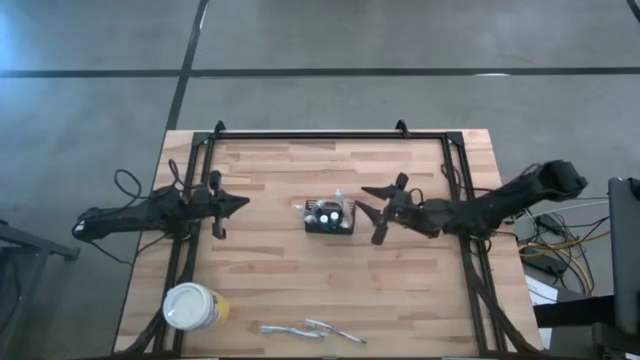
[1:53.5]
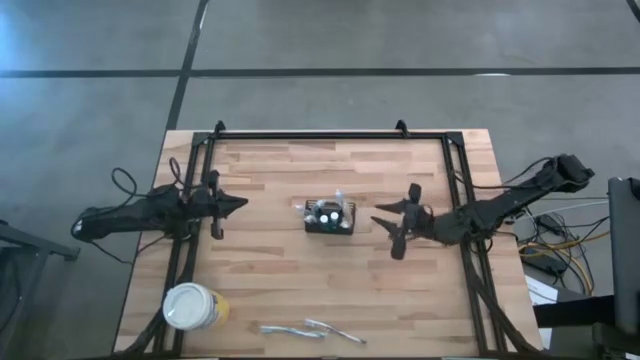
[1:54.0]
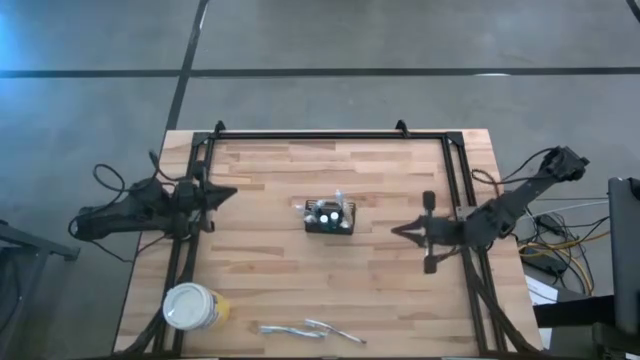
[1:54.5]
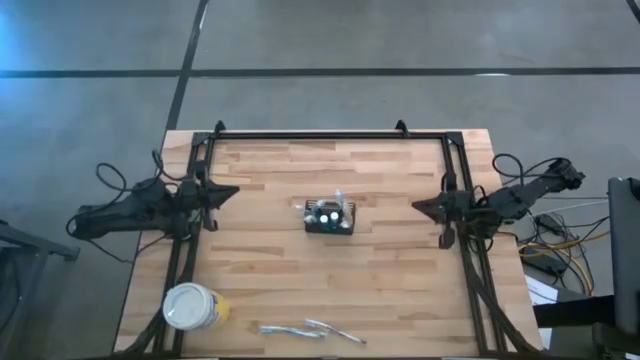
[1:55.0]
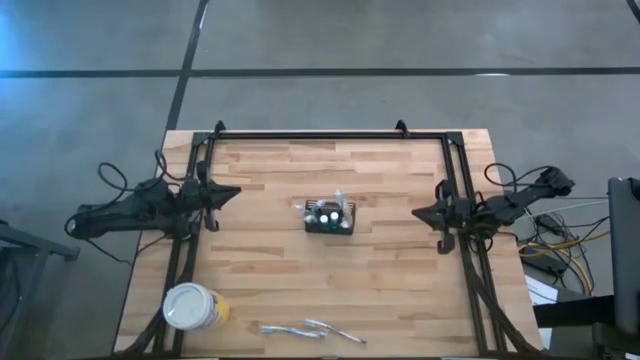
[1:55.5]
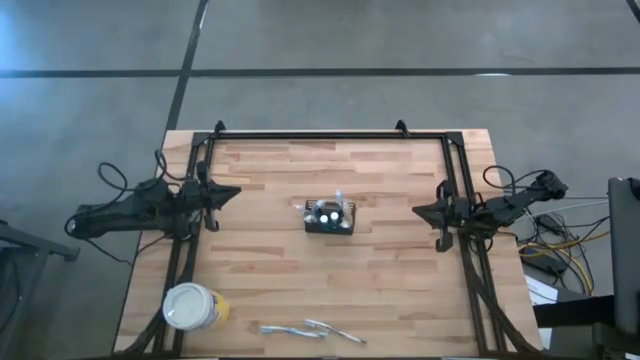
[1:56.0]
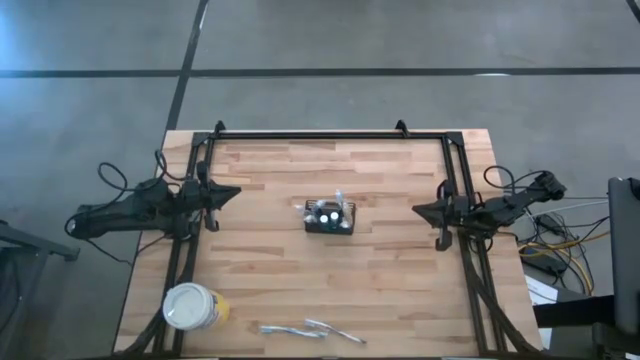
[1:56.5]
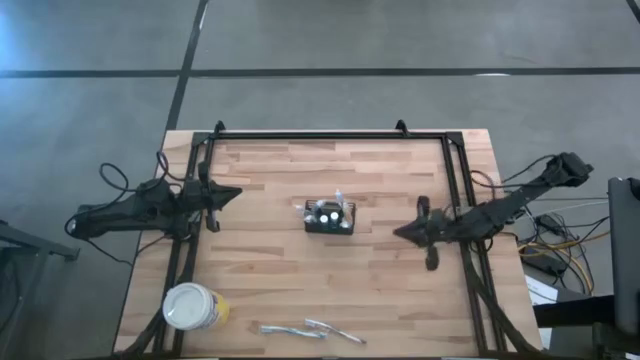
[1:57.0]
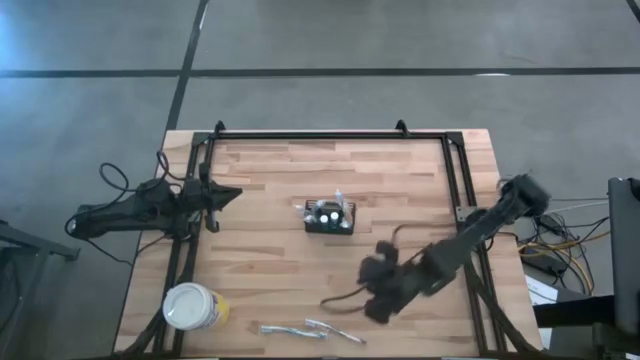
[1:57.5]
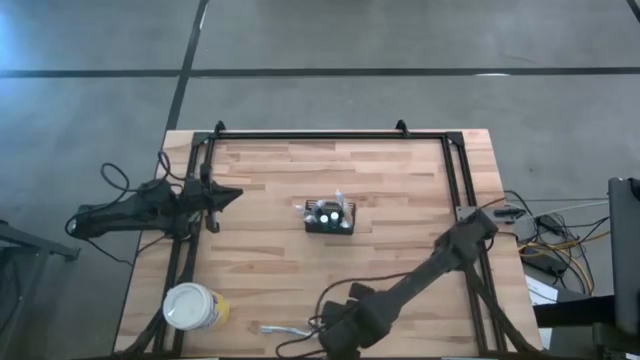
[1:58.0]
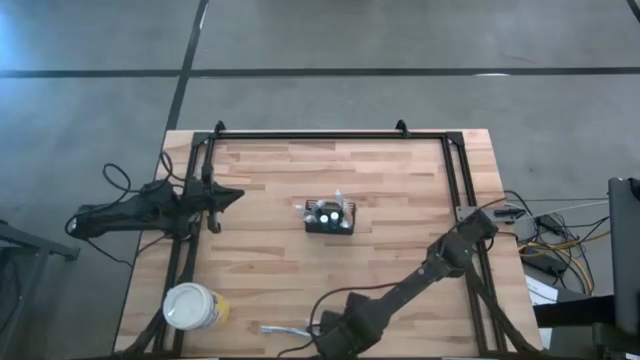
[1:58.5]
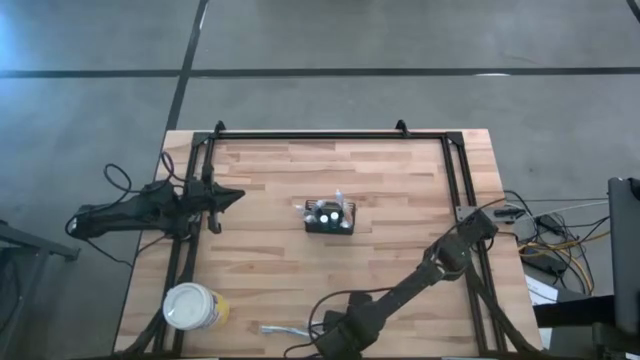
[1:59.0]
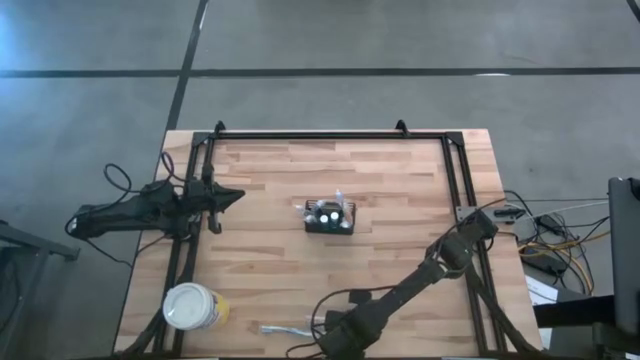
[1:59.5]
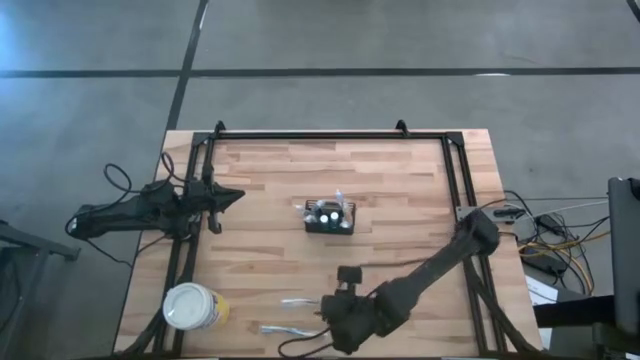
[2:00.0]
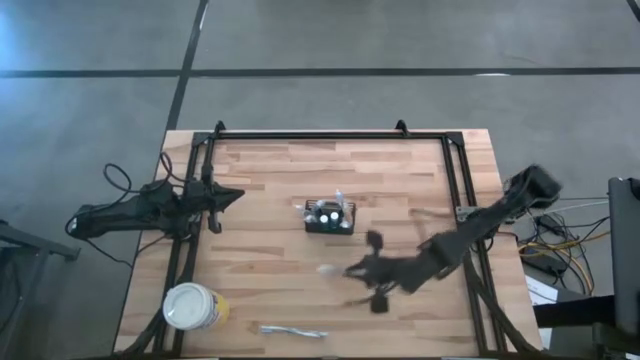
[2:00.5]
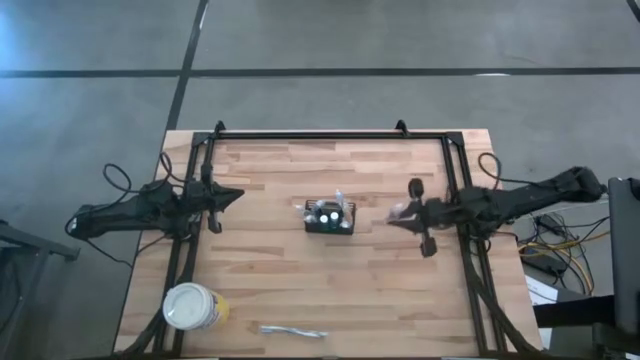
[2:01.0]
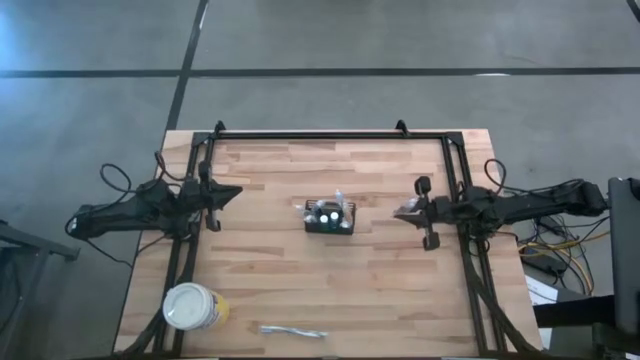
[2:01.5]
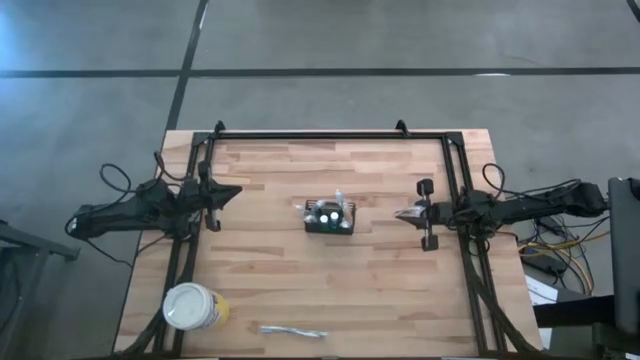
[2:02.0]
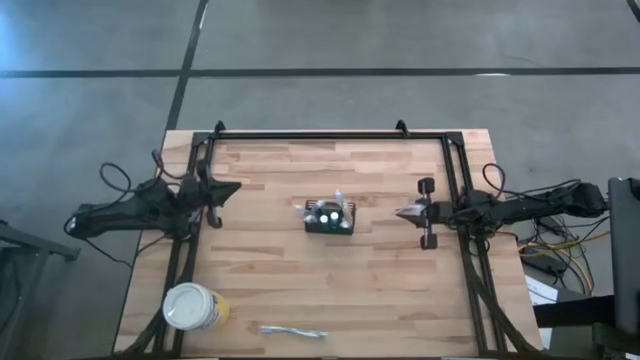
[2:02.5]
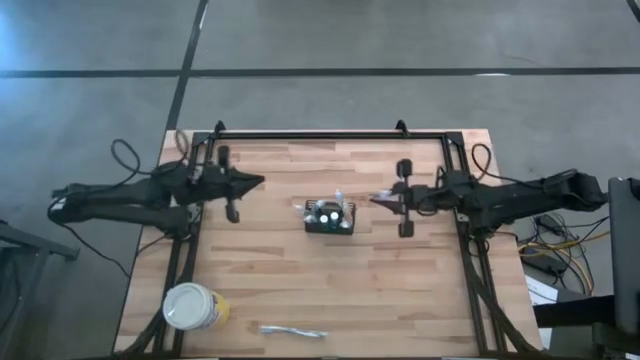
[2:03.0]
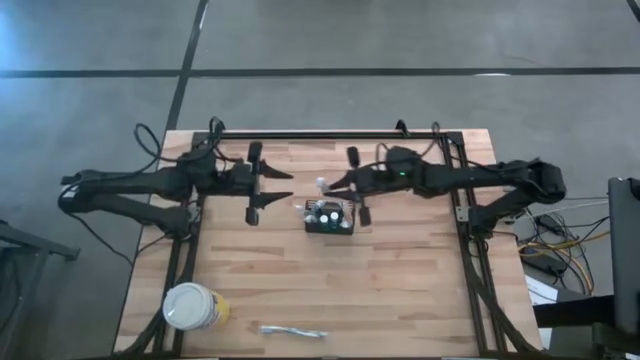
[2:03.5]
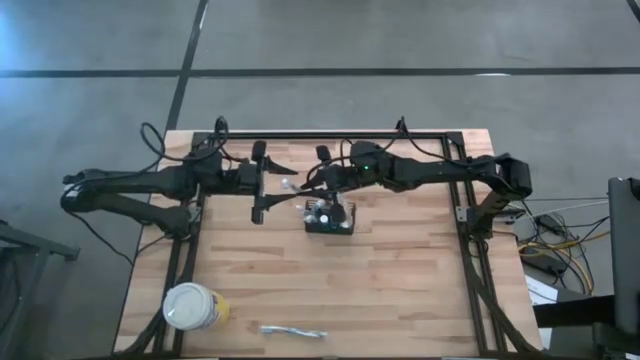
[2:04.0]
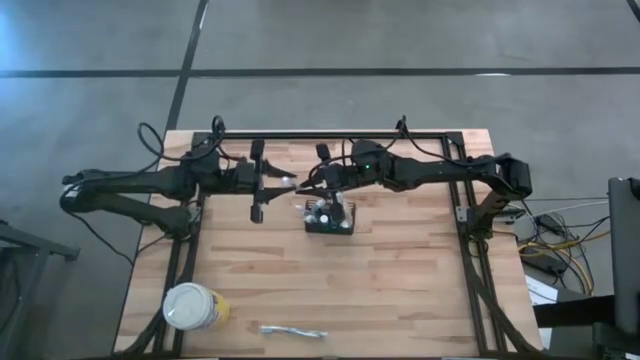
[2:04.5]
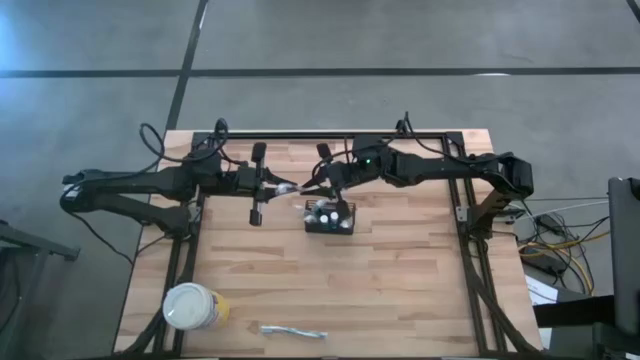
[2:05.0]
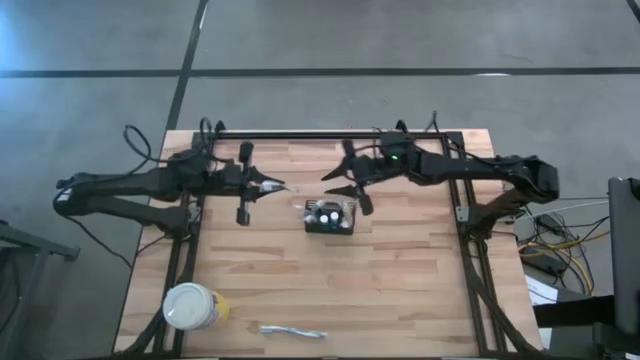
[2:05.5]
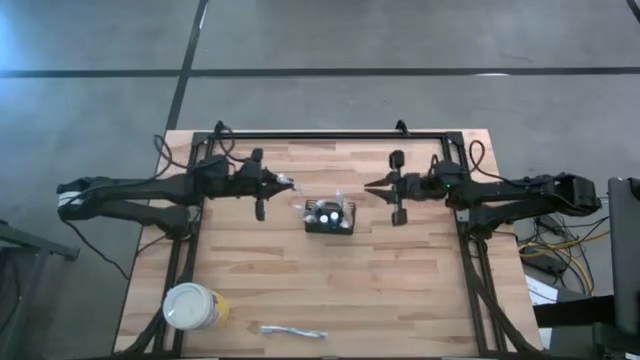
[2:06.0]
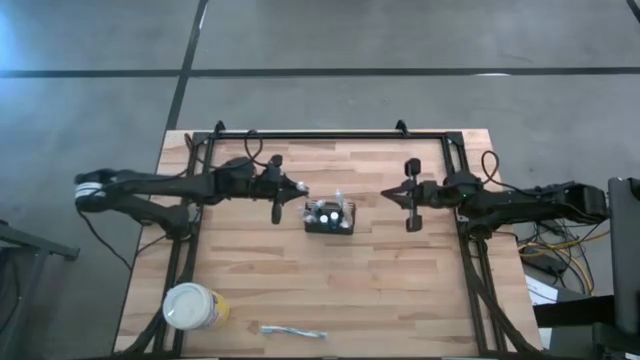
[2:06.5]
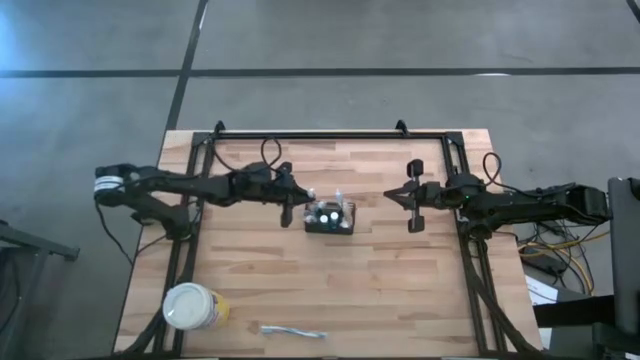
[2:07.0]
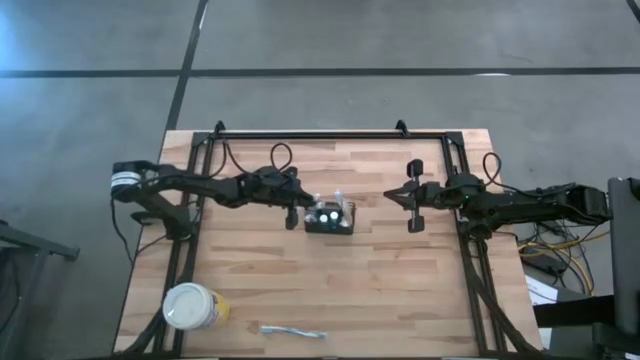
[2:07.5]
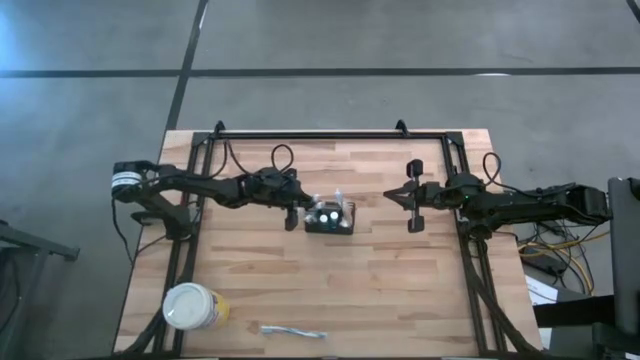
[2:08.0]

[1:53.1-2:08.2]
Task: Pick & Place toothbrushing station
Put the purple toothbrush into the wire organizer

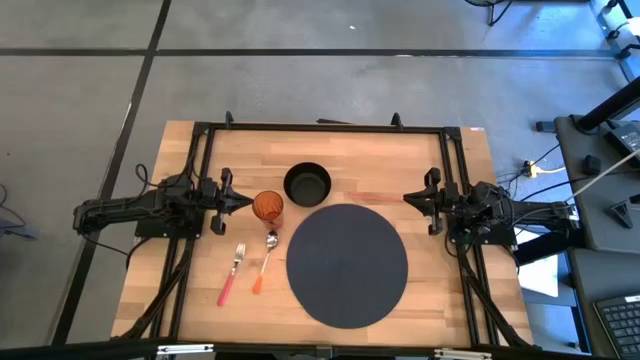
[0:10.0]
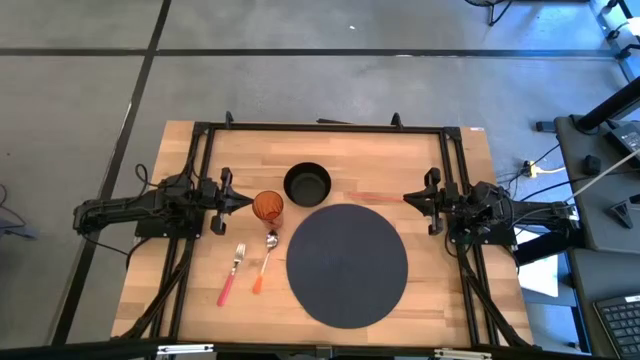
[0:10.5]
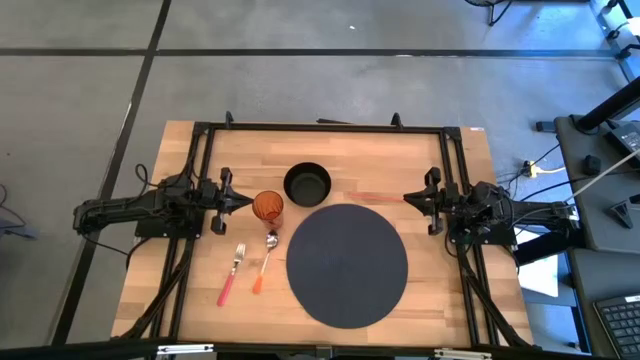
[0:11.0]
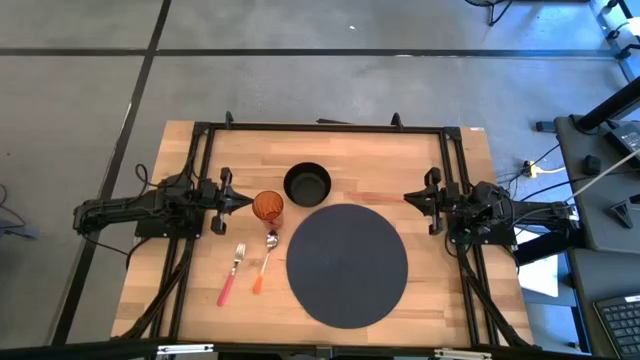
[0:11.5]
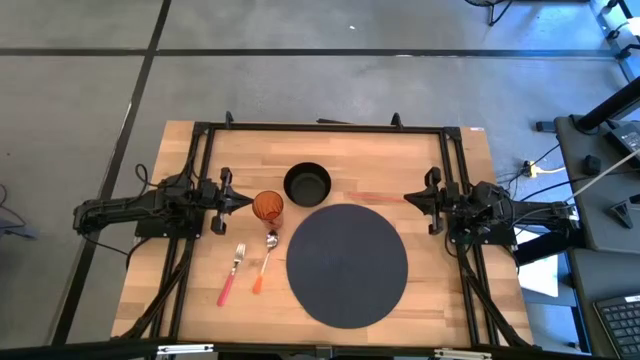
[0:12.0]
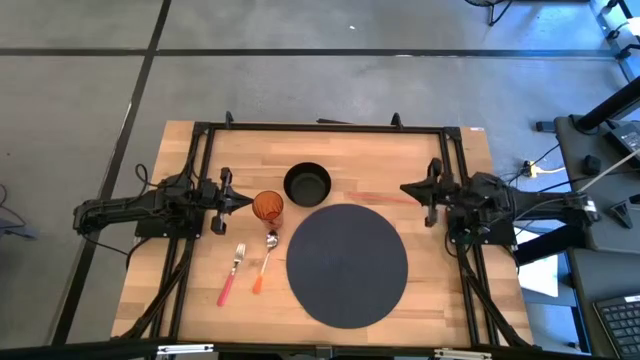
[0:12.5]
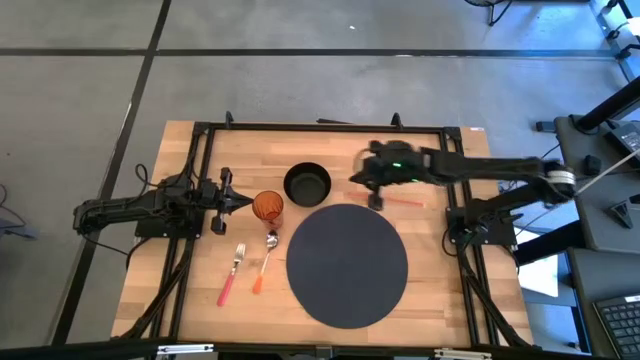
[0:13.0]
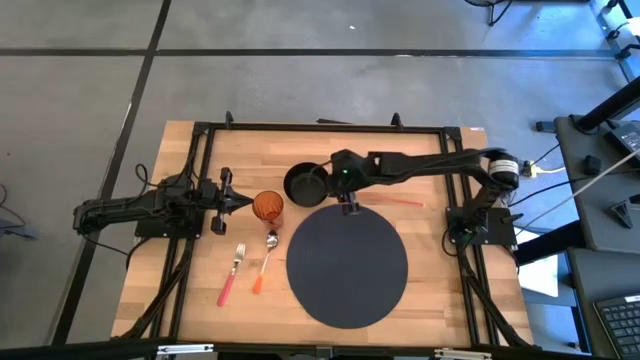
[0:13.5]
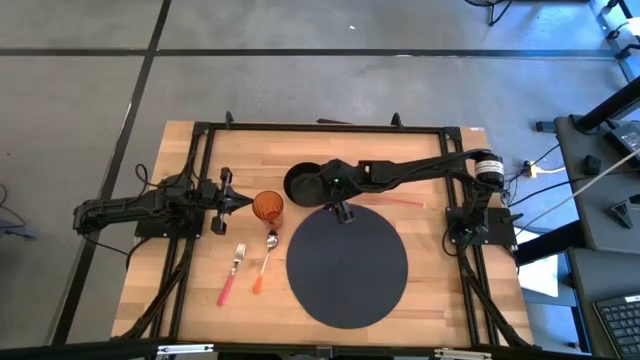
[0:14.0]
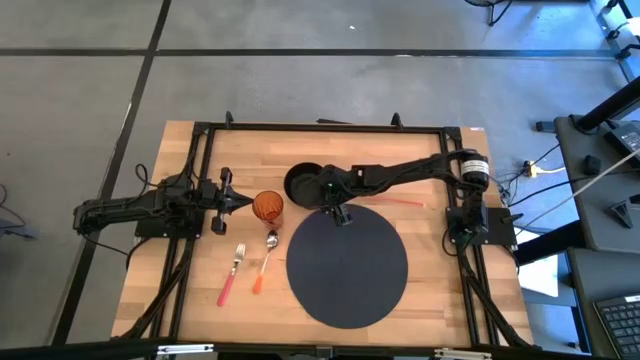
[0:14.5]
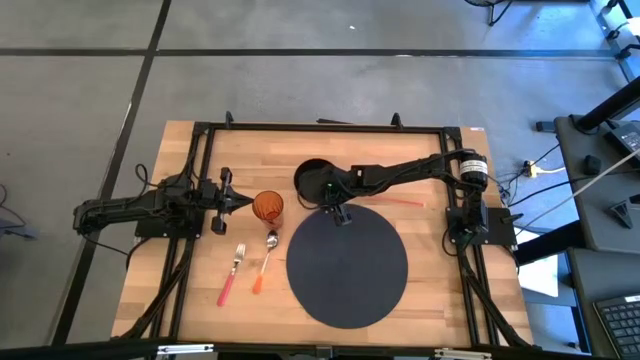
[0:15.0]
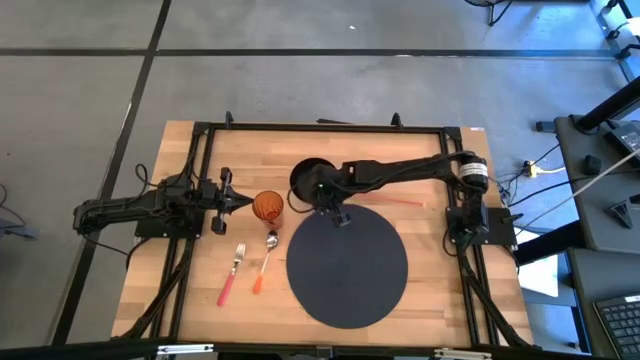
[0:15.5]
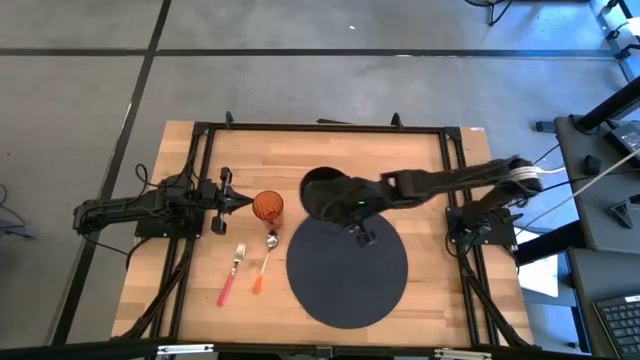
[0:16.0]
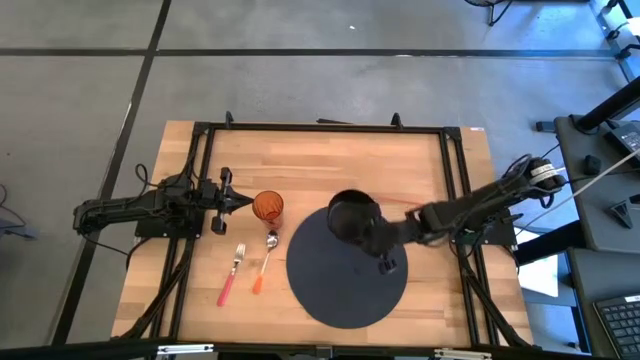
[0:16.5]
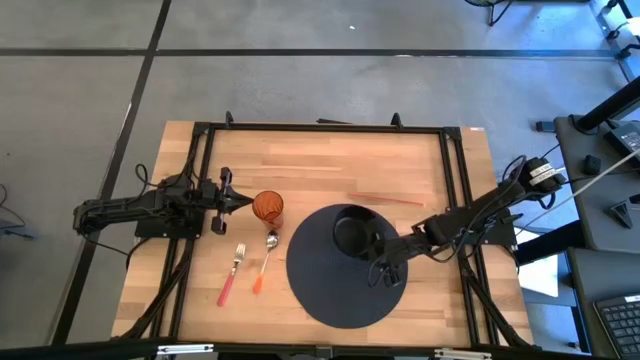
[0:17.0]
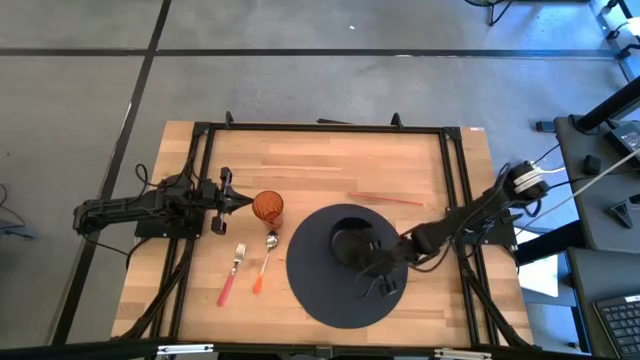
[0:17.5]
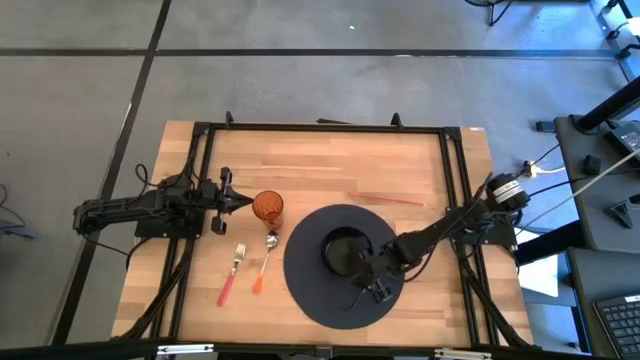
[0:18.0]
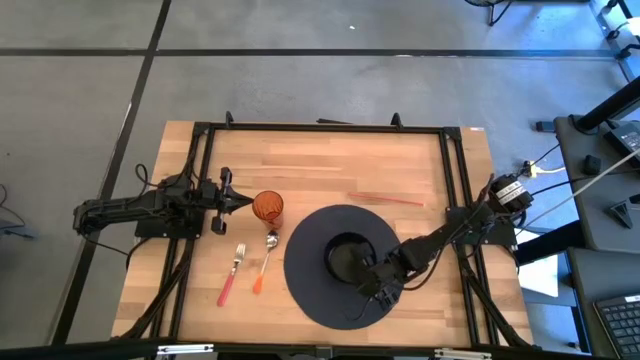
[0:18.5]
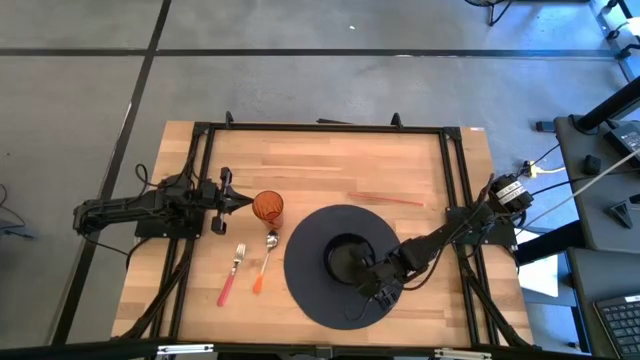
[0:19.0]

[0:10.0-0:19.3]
Task: Pick & Place Utensil
Put the black bowl on the dark blue mat
